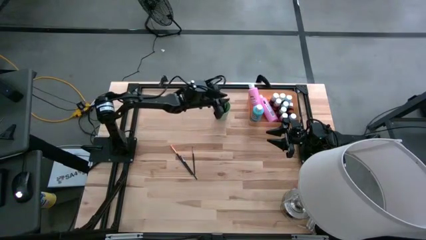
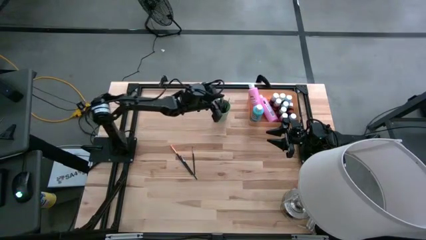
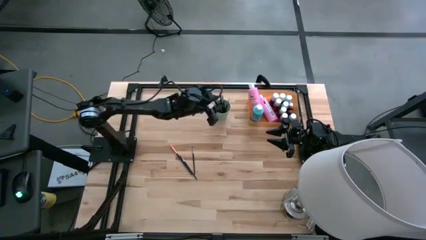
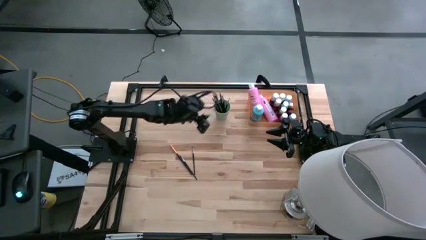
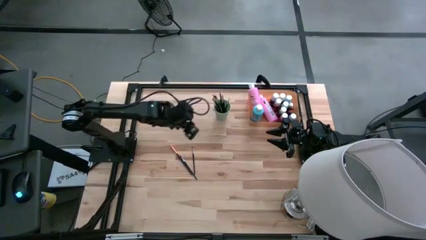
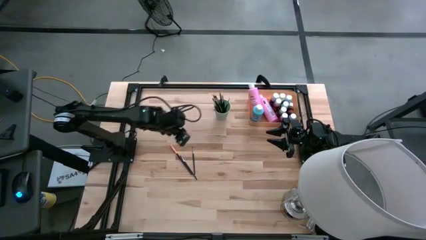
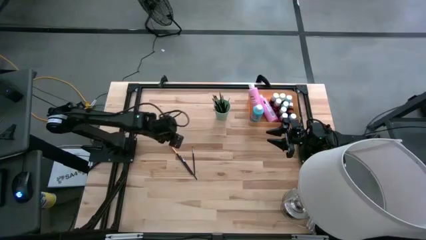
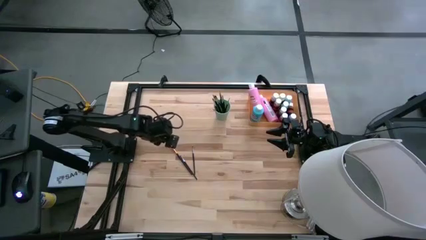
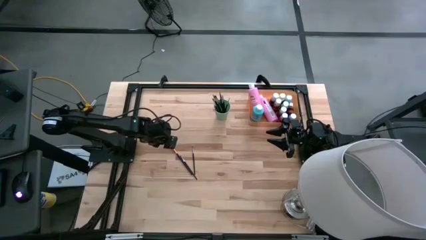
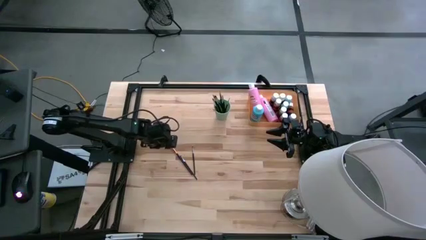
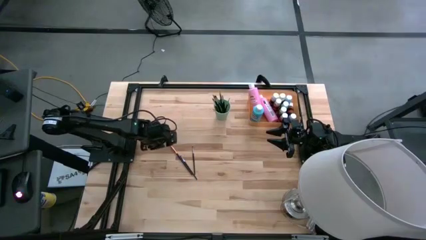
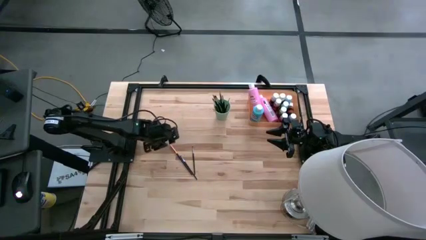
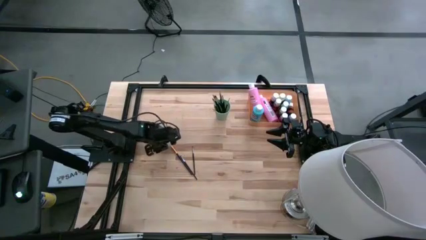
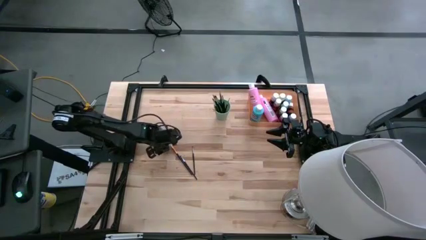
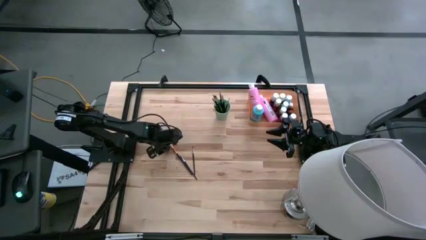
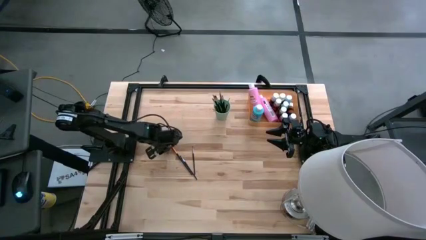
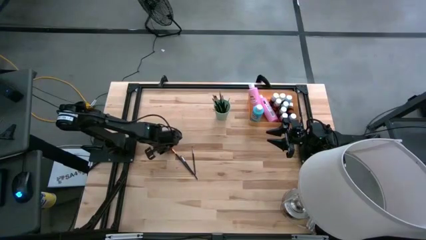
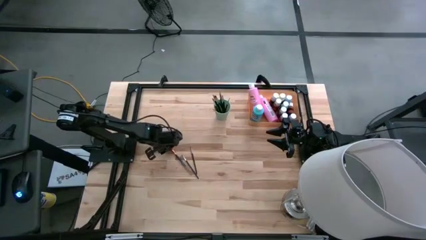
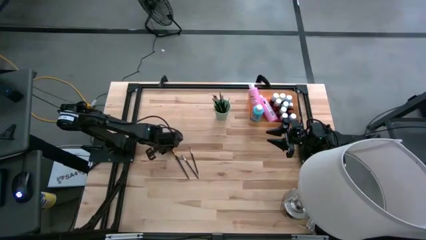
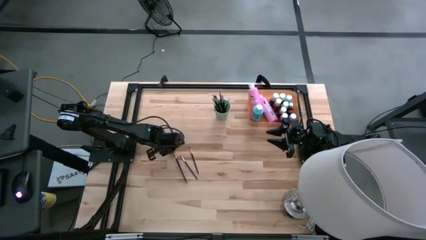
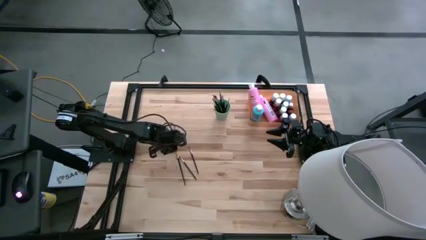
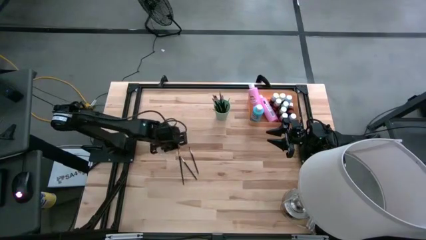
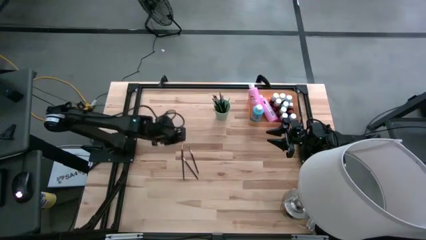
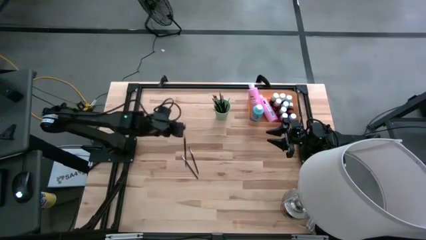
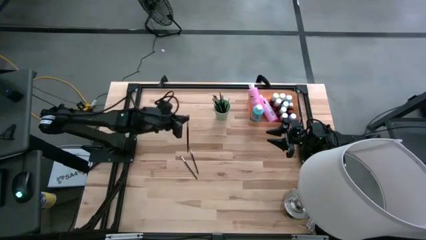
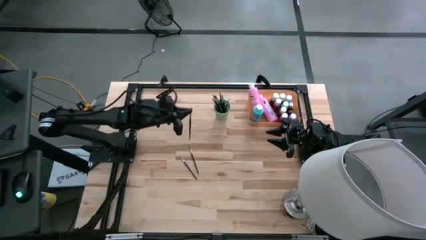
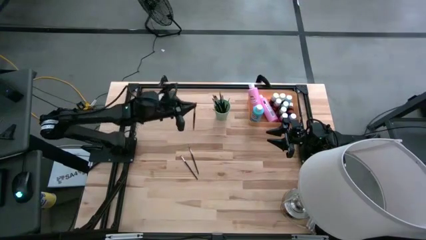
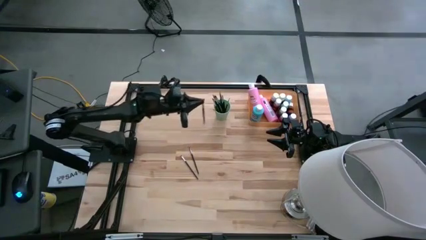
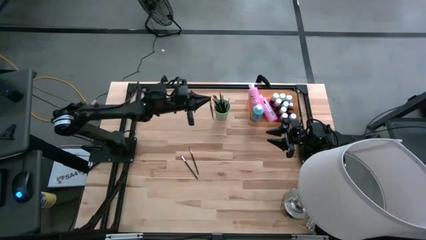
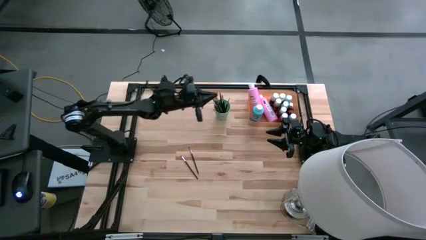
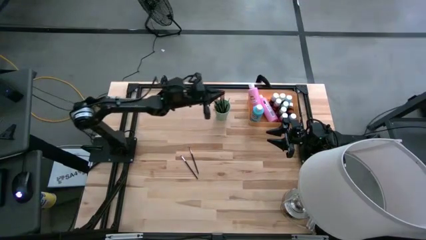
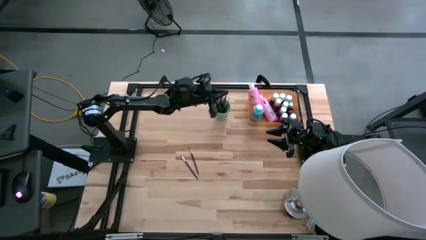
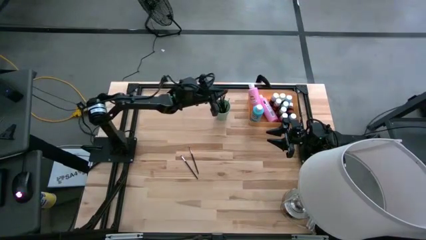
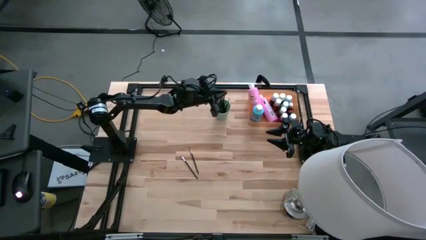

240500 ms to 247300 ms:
Task: Pick & Place Paint Supplies
Put the gold paintbrush into the green cup

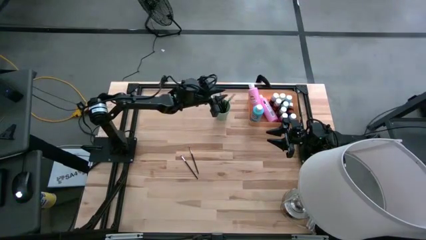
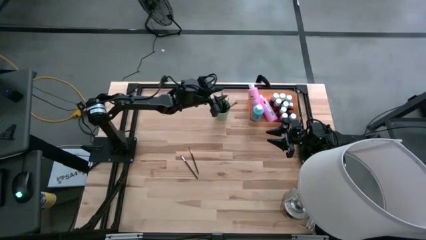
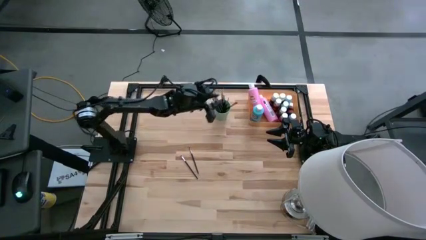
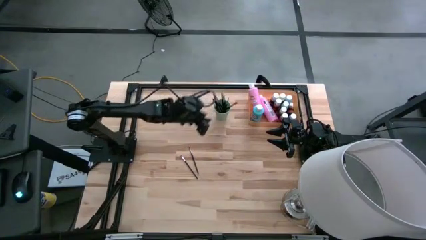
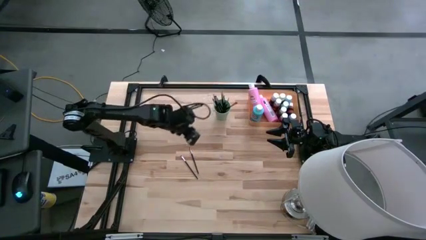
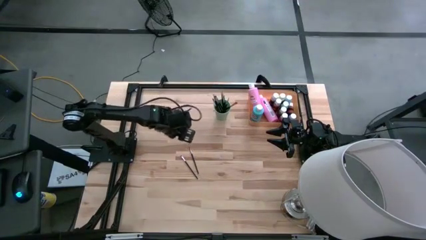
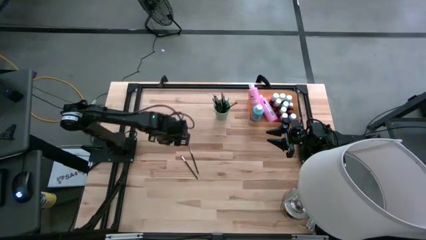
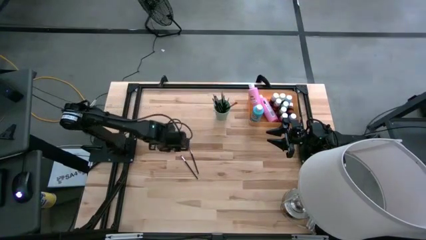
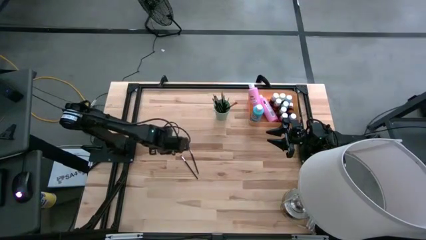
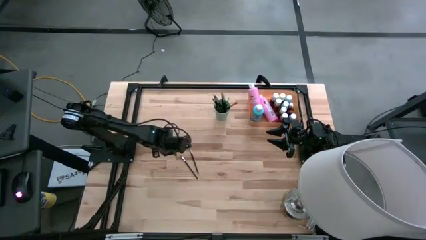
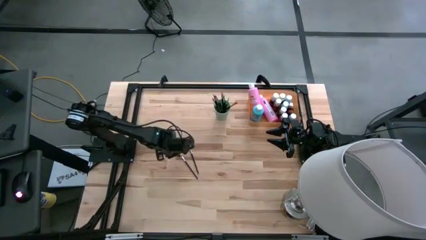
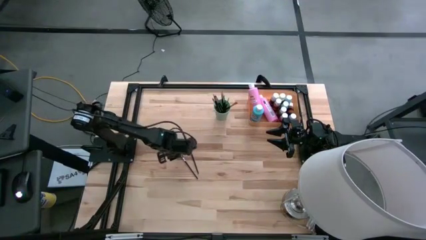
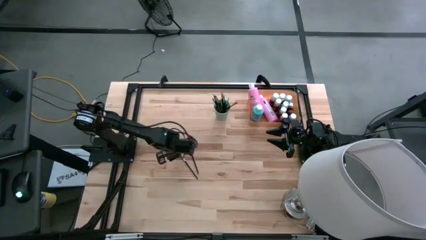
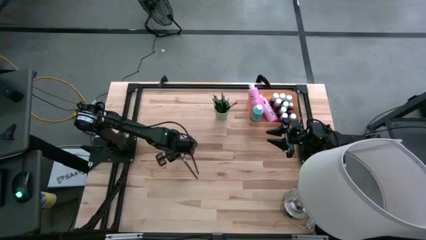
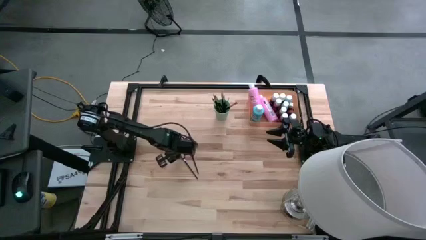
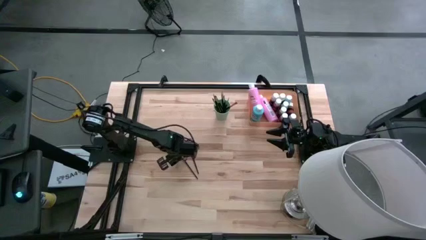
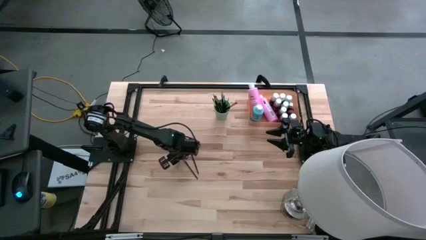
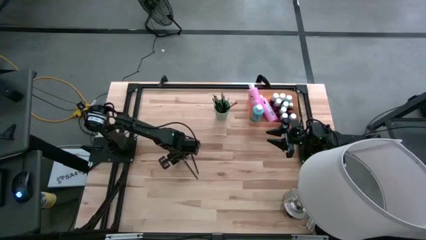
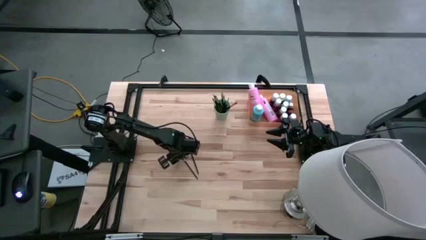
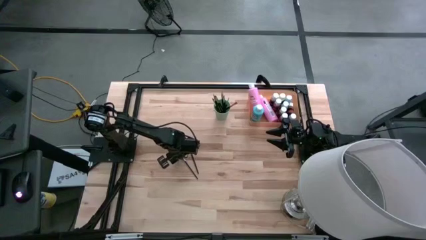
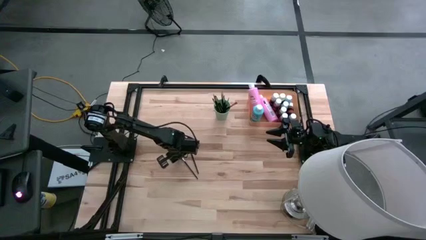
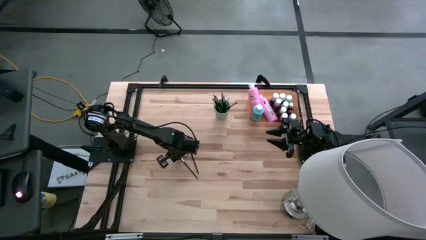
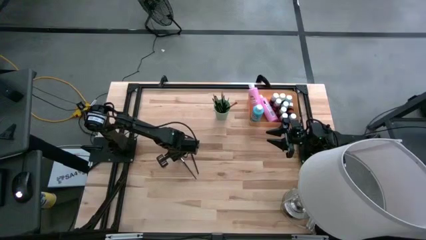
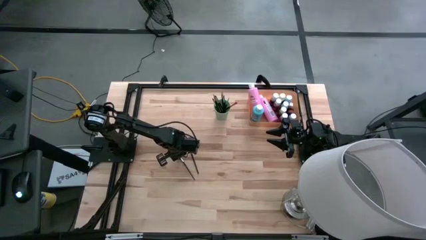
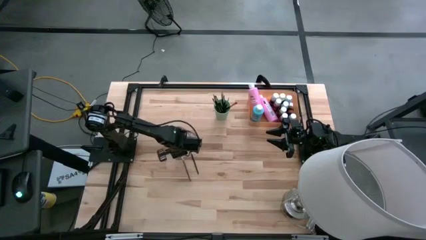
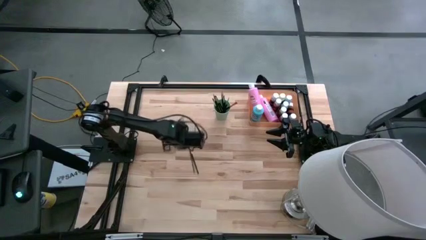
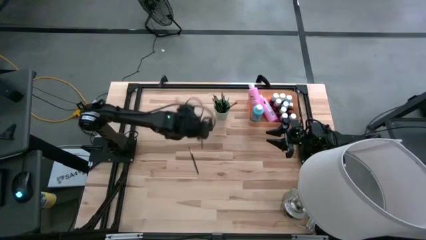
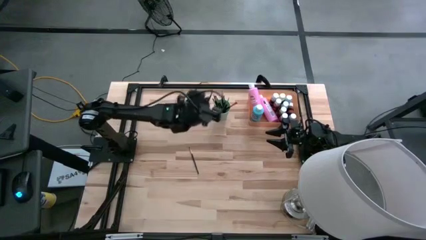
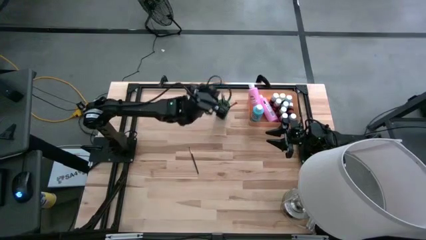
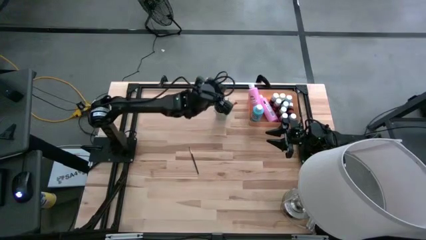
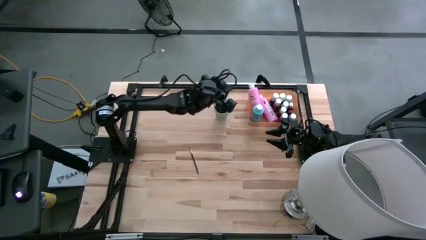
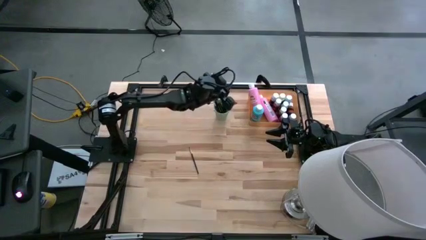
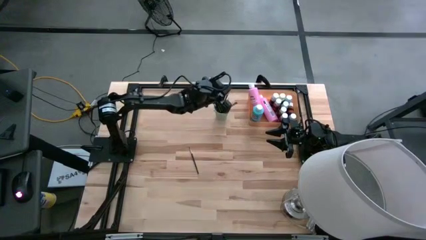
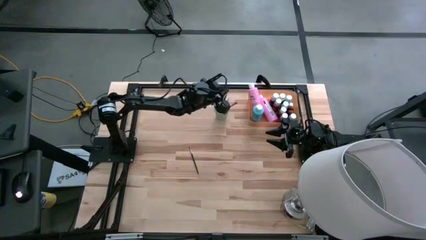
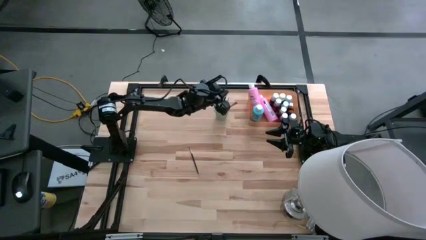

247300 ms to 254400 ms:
Put the left silver paintbrush into the green cup

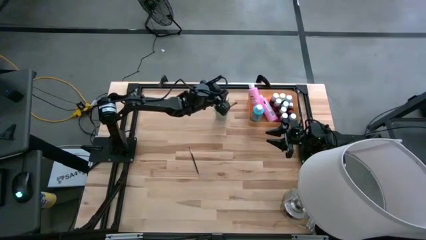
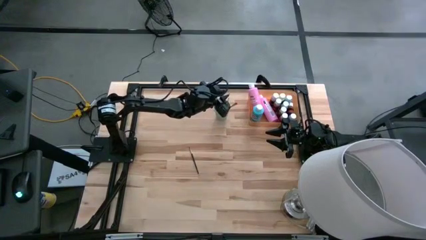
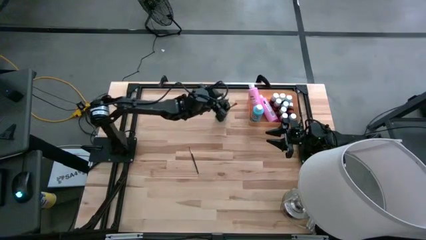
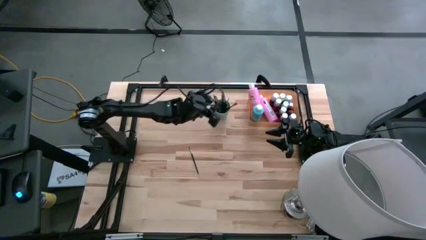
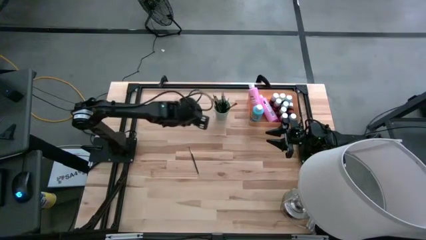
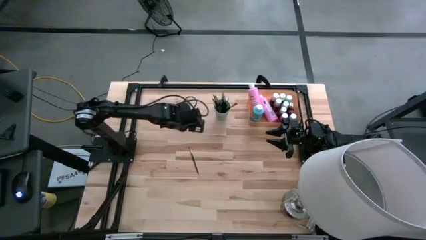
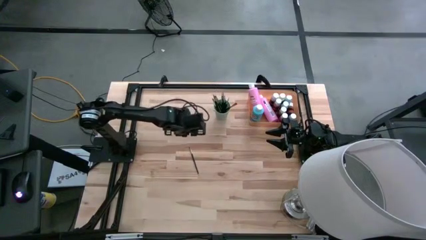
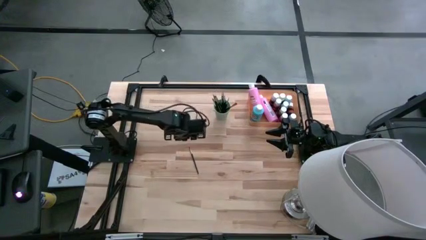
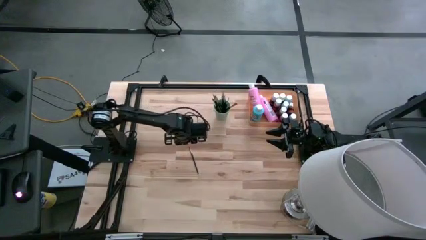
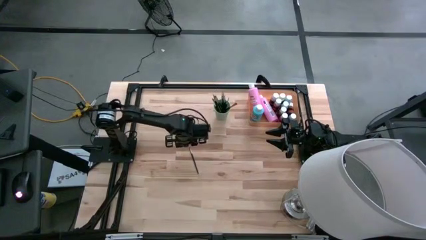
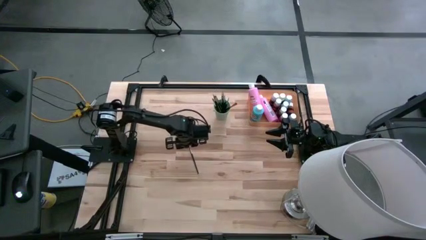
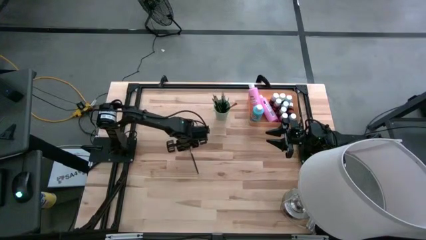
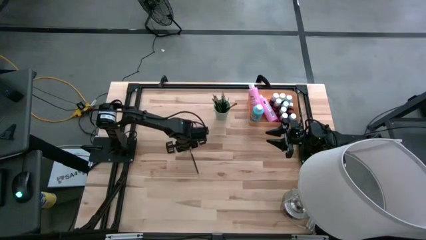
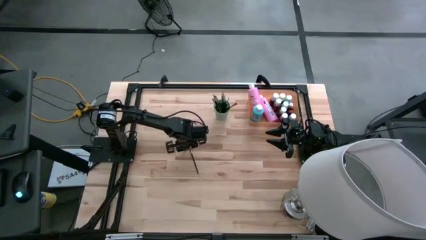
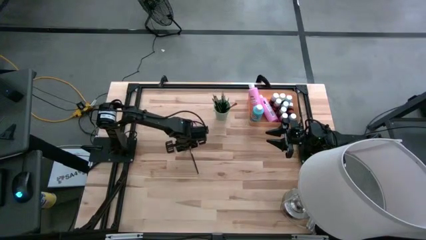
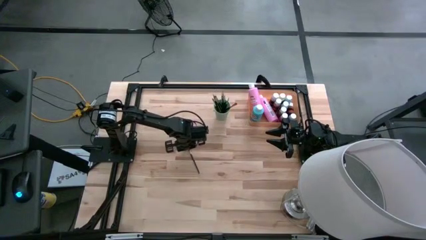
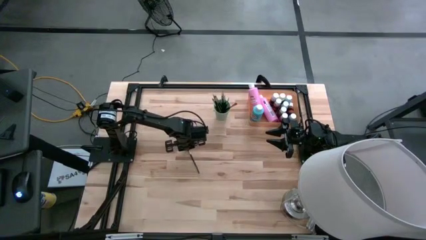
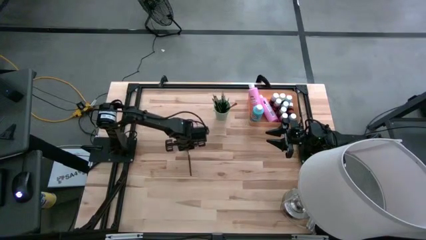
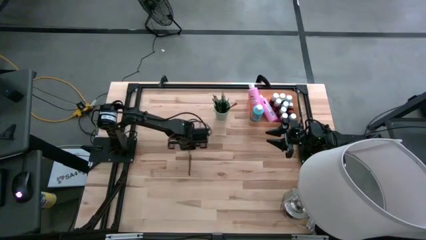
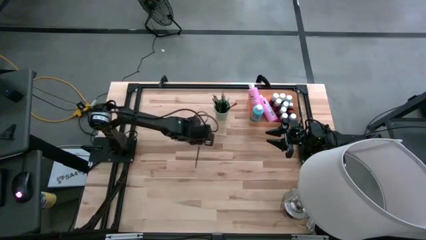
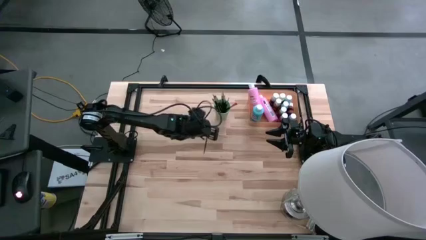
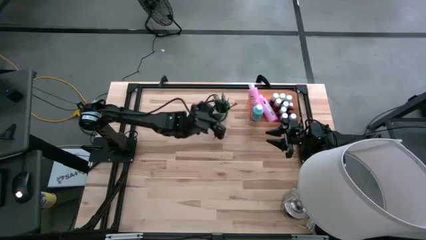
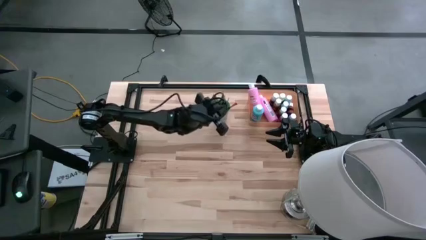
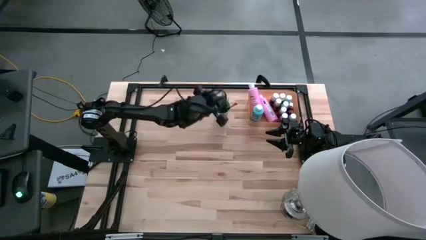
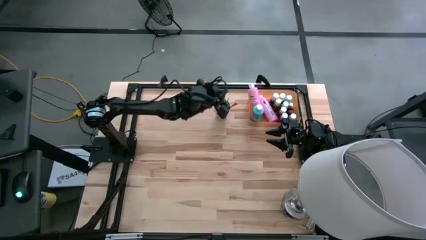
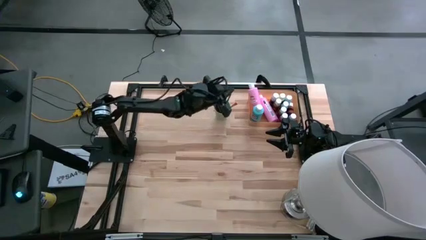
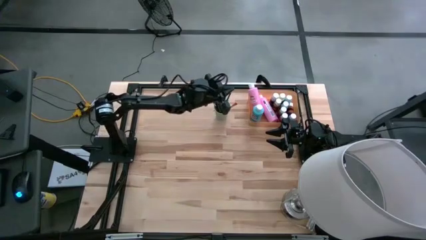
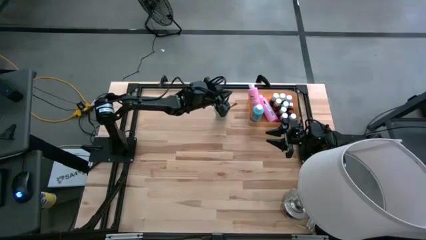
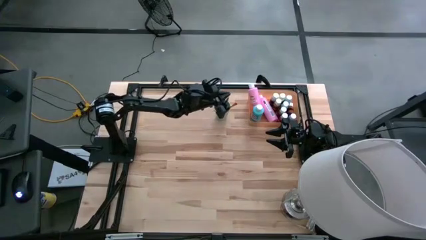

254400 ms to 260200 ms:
Put the silver paintbrush into the green cup
